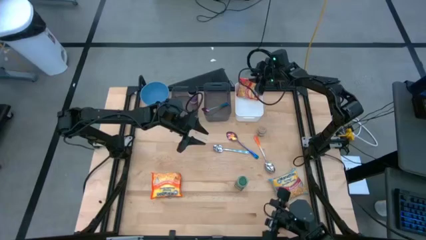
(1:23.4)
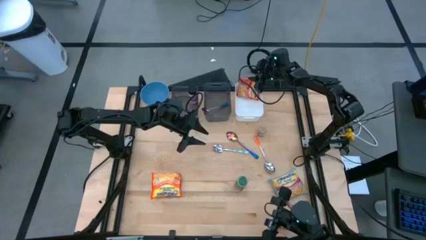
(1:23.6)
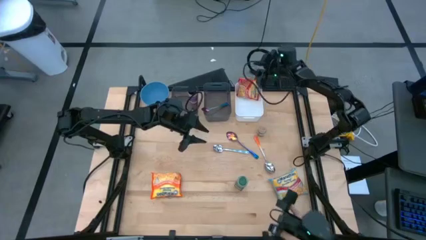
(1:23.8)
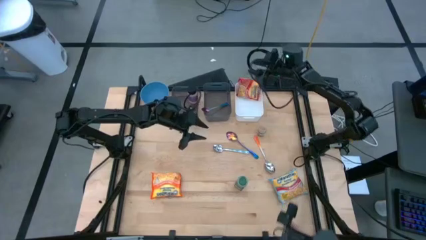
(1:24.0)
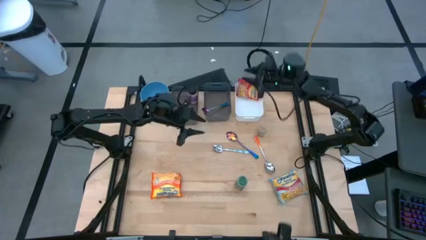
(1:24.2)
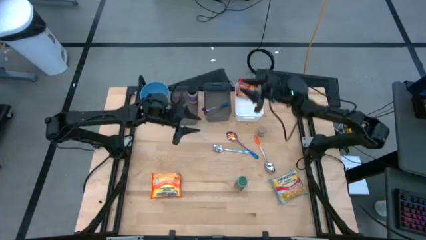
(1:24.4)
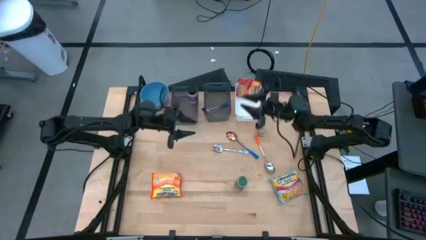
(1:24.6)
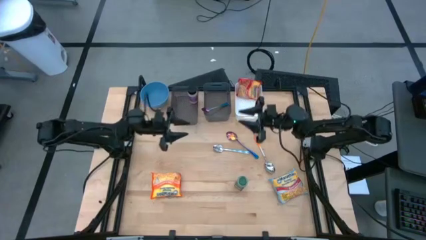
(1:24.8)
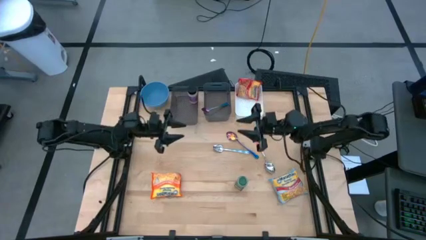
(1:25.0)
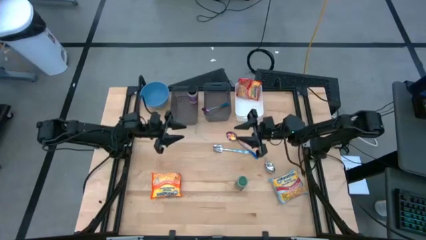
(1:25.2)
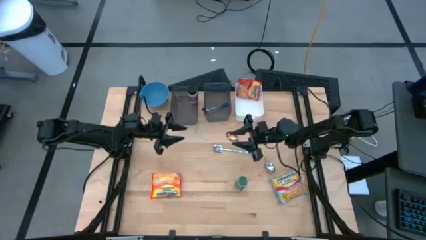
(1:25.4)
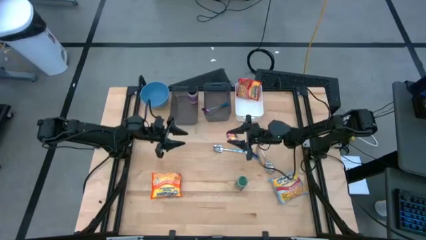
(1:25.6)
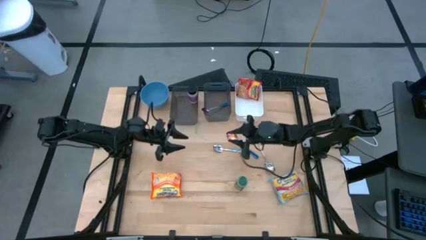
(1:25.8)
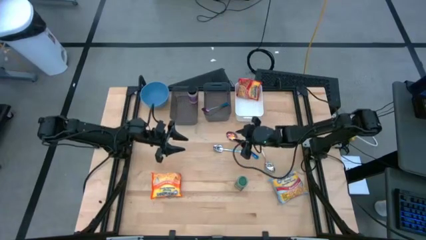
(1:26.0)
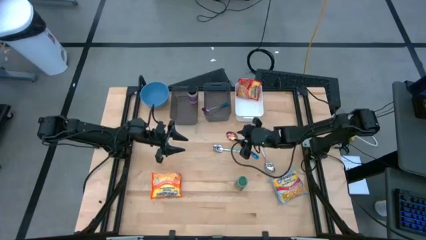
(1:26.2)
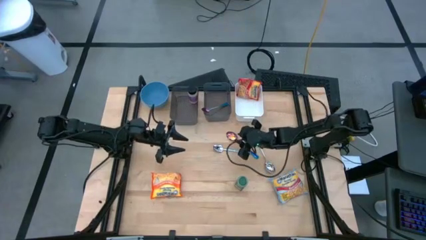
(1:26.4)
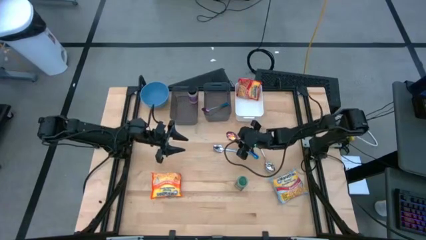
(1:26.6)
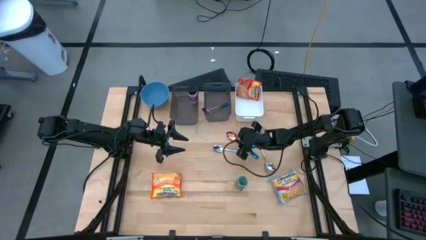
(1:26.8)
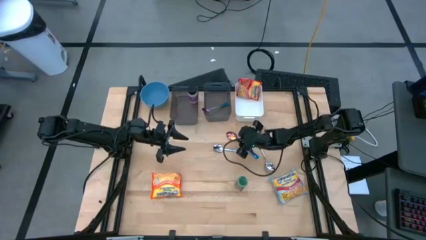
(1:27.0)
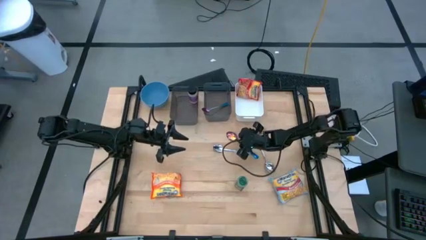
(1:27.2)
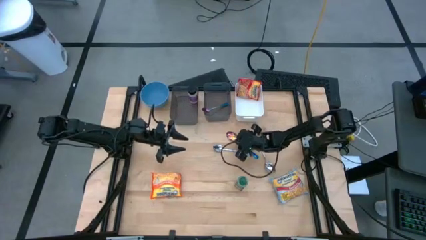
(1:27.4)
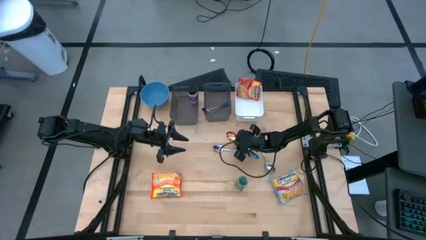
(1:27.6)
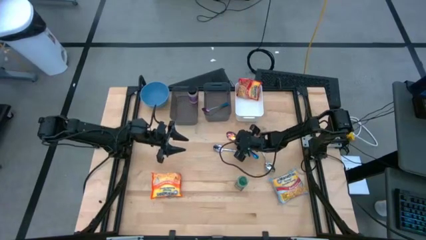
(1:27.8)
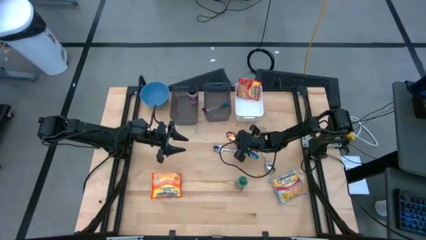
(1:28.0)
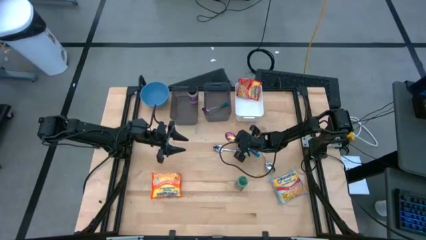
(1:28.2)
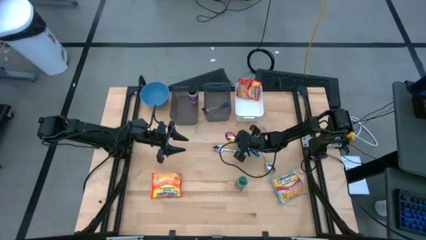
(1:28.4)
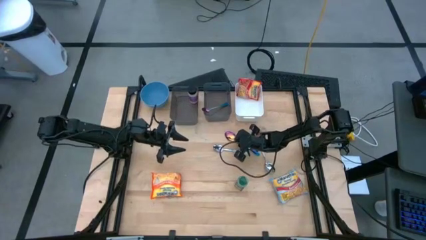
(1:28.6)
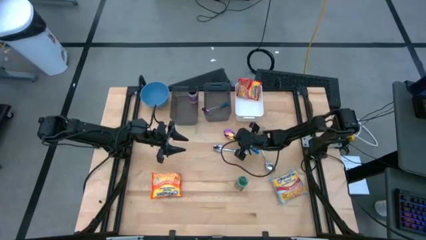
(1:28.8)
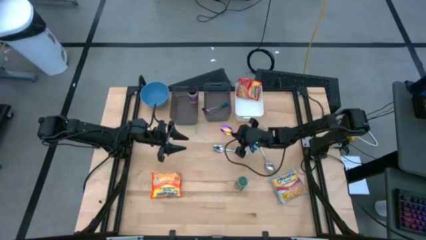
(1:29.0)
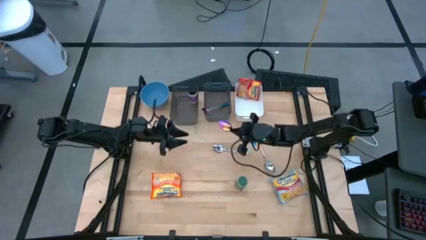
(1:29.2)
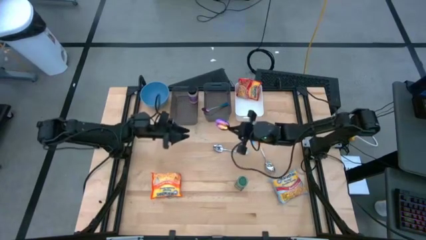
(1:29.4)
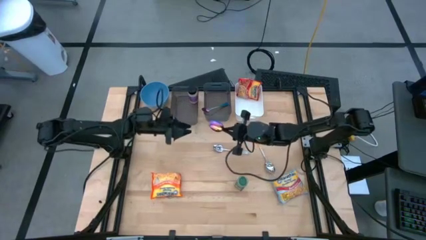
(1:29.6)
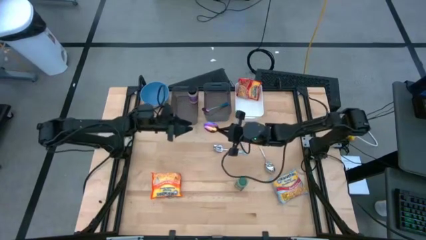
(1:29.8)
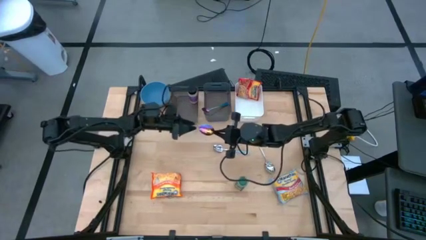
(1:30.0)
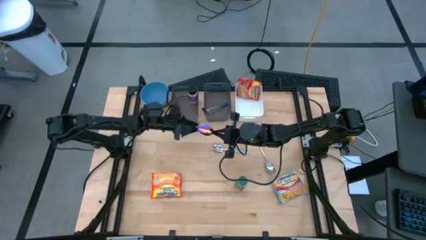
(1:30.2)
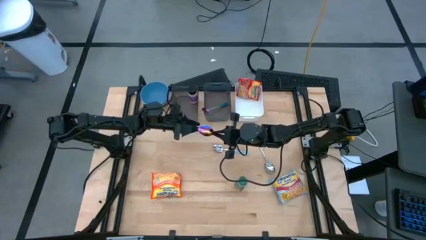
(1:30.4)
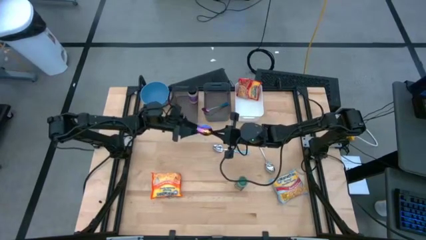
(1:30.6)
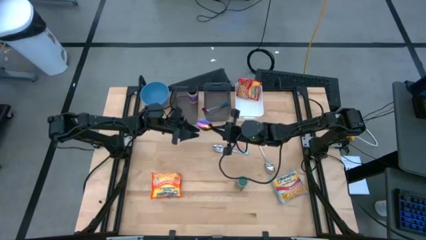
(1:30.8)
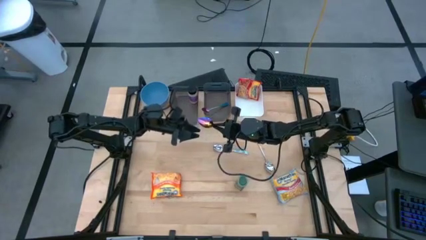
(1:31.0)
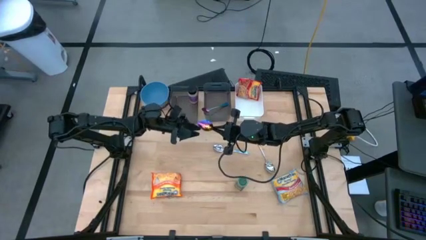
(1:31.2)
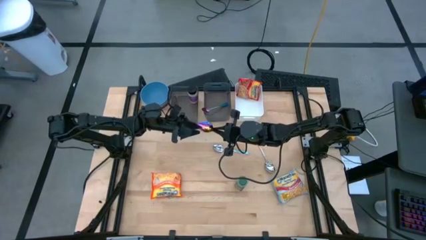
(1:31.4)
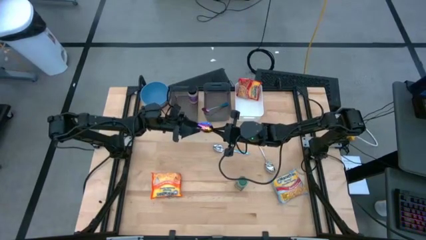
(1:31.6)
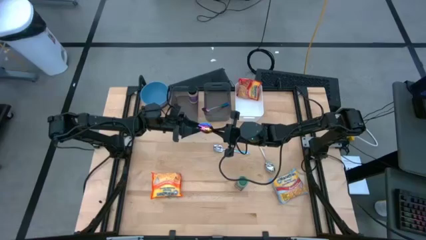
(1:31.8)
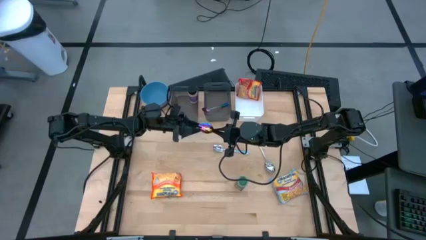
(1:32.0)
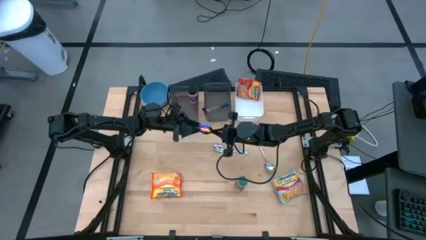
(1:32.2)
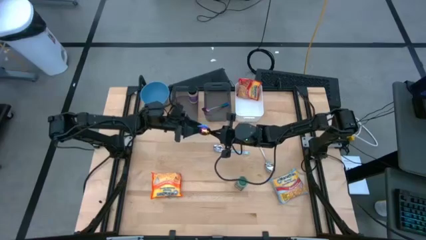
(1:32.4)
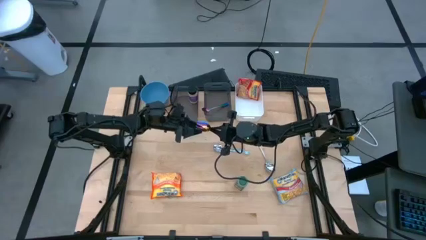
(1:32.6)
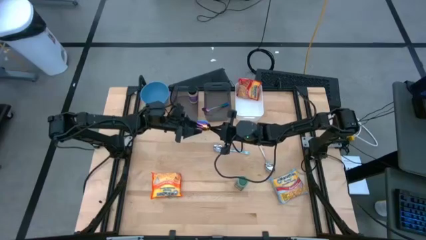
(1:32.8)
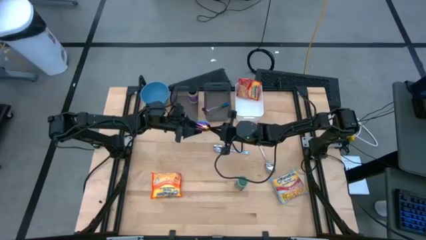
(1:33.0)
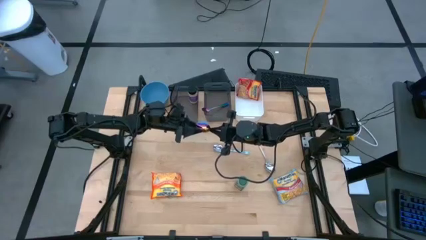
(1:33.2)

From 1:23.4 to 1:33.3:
Task: Pick & Place Food Item
Put the blue spoon into the right black bin

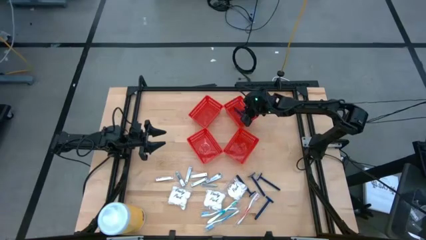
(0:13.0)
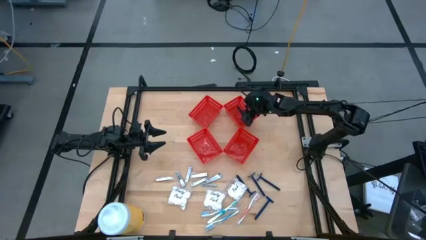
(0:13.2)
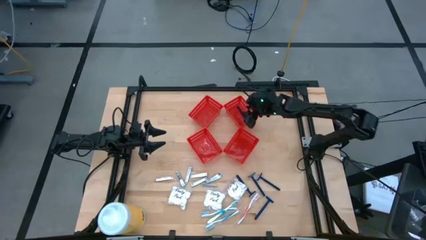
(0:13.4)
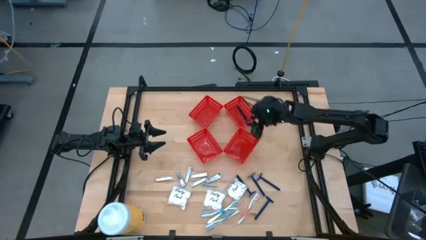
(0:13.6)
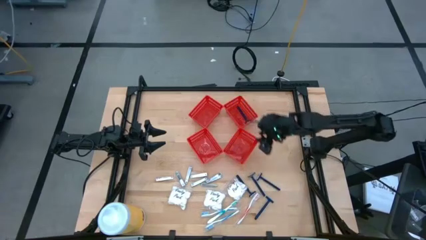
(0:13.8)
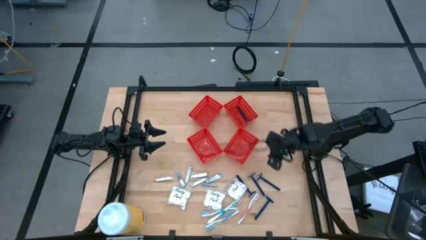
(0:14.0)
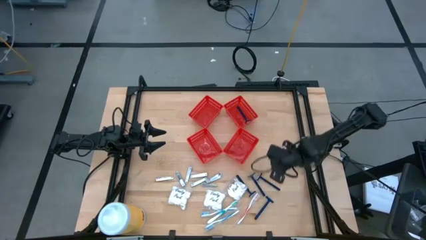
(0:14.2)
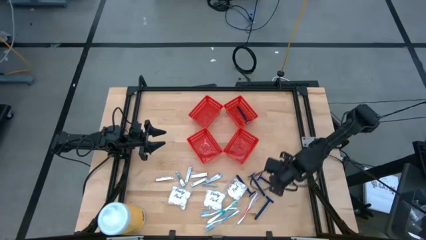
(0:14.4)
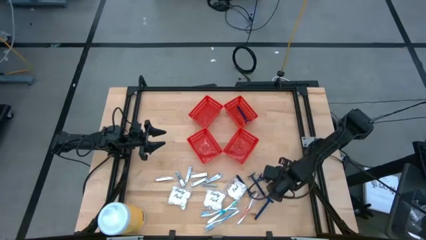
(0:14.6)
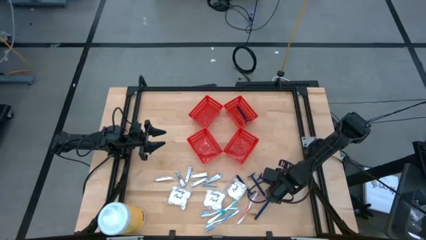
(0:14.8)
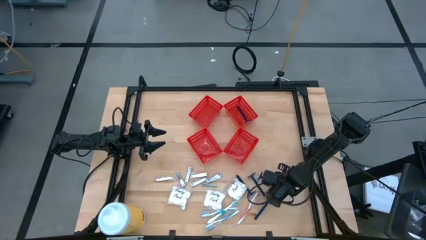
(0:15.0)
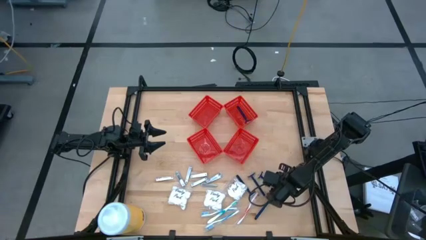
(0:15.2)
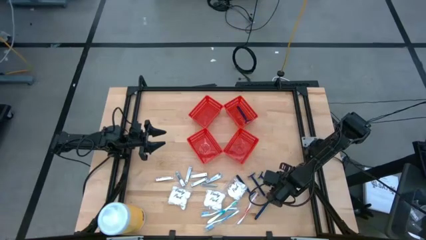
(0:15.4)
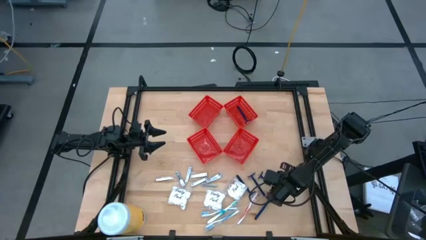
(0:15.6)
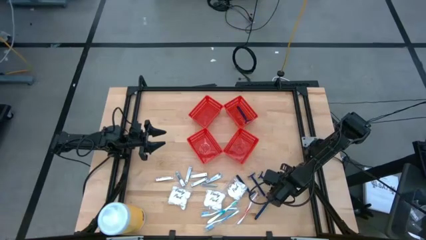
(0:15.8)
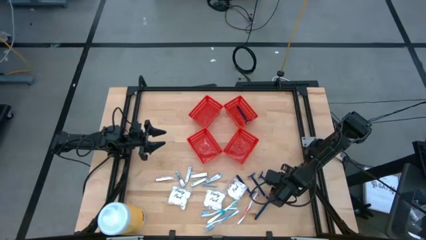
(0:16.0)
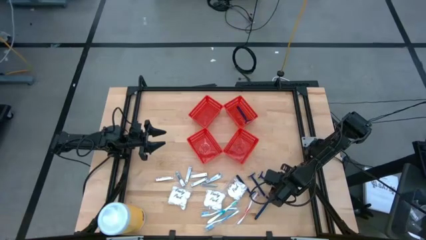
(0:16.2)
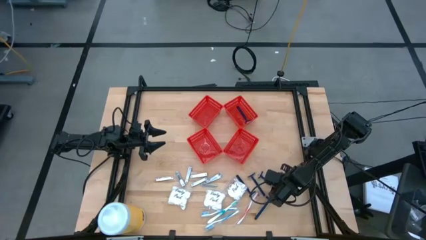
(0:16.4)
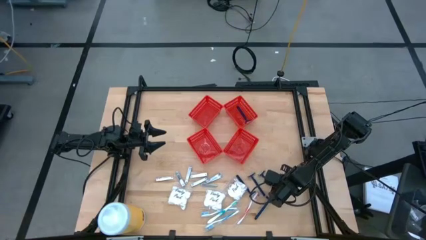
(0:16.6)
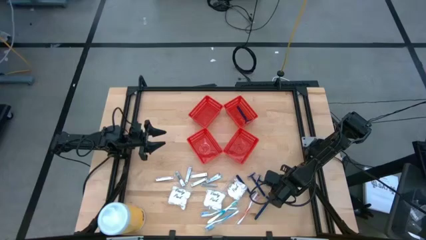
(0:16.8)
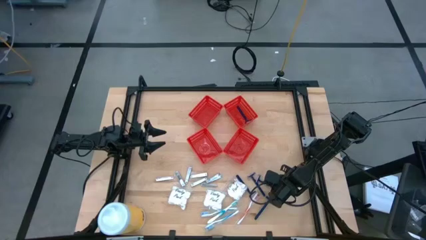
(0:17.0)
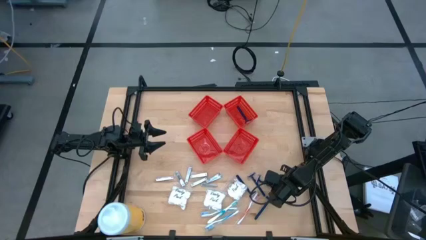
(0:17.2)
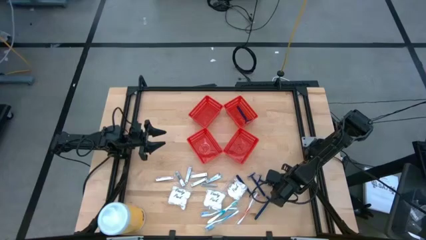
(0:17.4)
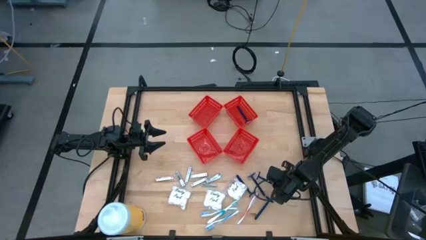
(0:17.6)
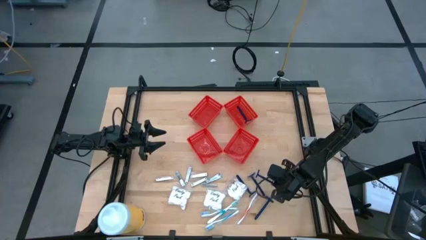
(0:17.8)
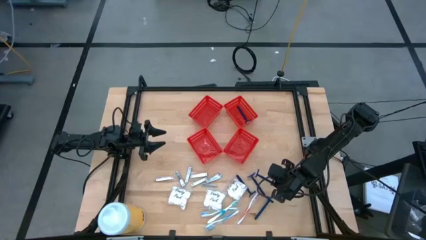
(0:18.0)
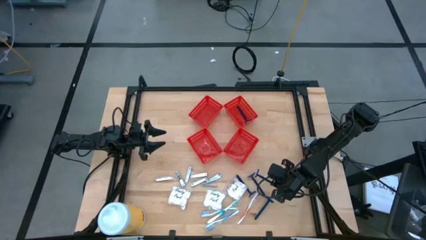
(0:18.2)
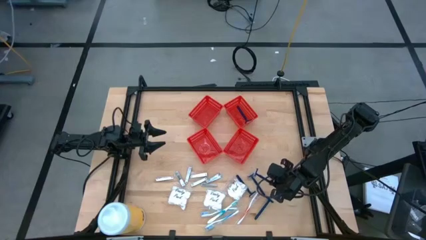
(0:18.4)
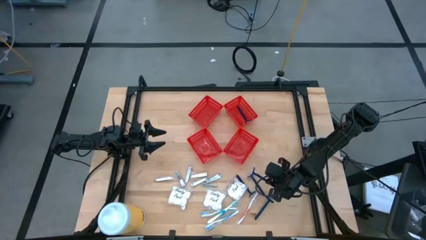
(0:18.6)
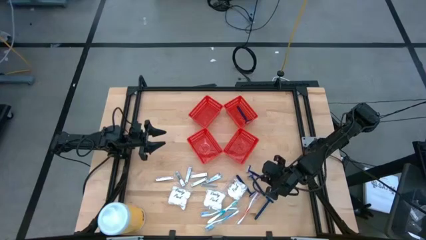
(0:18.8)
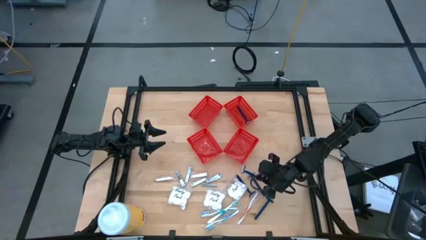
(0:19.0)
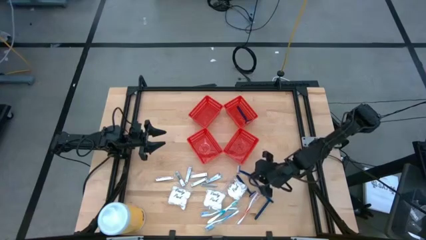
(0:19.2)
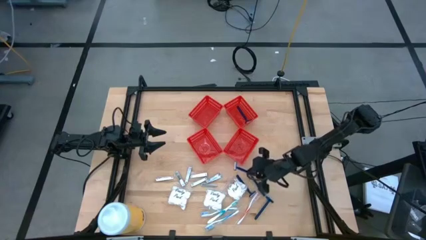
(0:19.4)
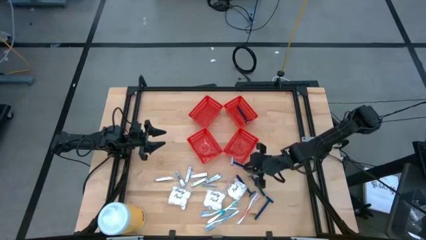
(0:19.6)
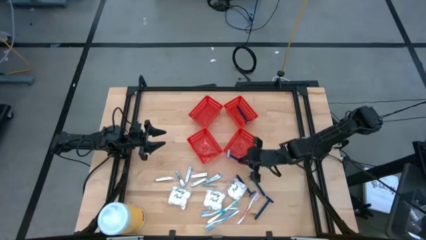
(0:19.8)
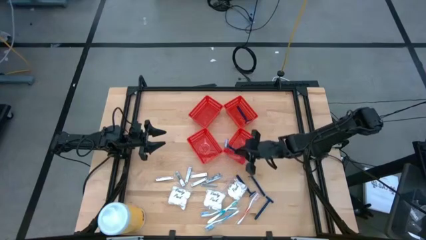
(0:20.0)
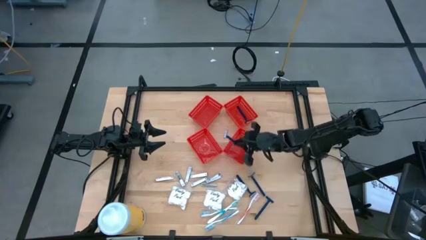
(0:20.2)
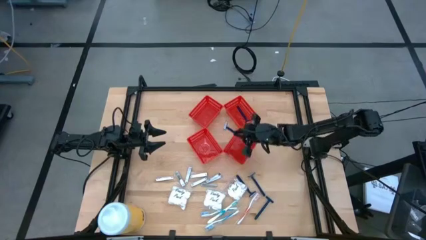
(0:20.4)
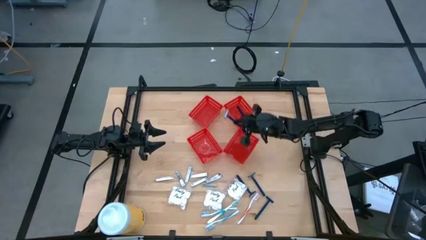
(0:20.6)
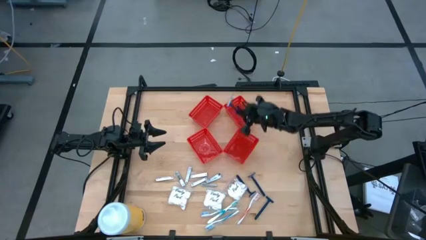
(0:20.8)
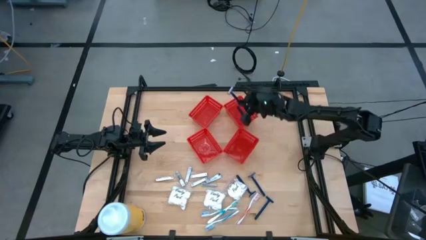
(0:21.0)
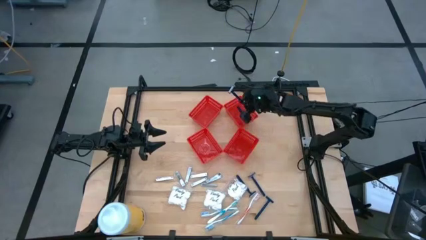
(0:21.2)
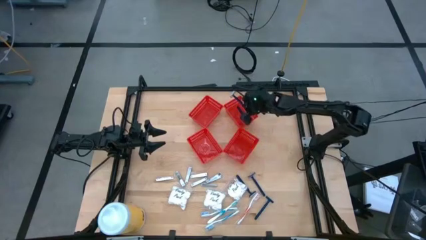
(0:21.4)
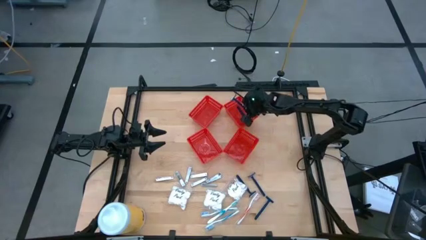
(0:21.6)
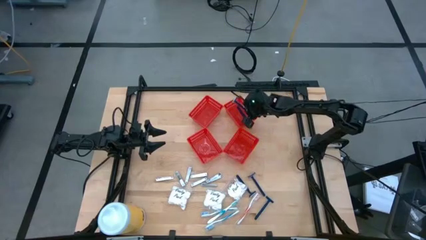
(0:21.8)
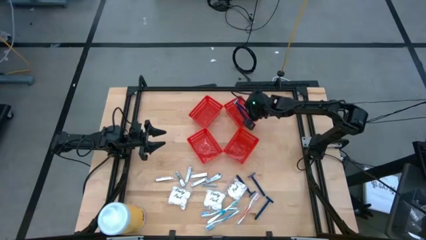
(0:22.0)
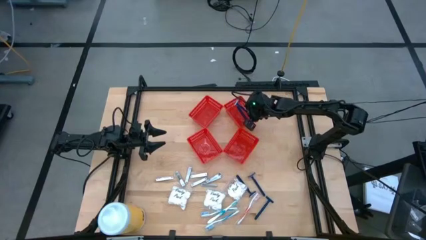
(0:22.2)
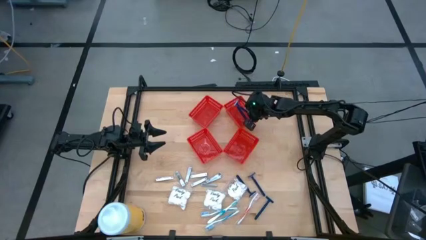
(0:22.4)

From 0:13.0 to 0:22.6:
Task: Pick & Place Travel size toiletries
Put the blue razor into the top right red bin
